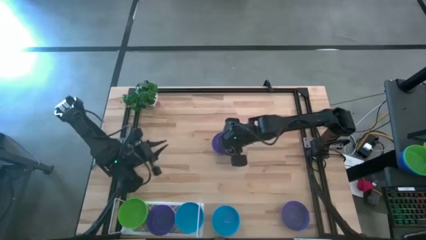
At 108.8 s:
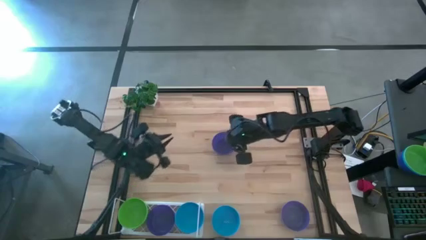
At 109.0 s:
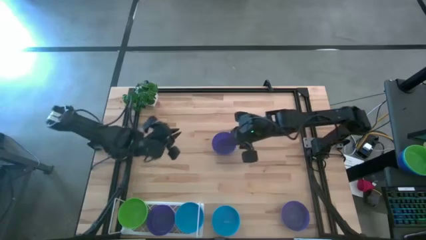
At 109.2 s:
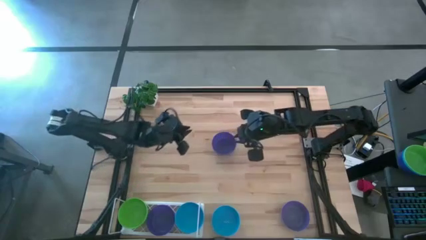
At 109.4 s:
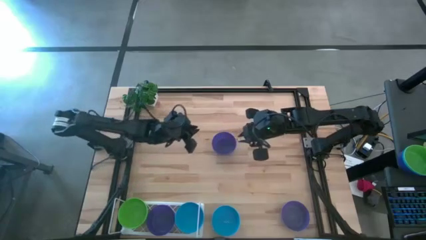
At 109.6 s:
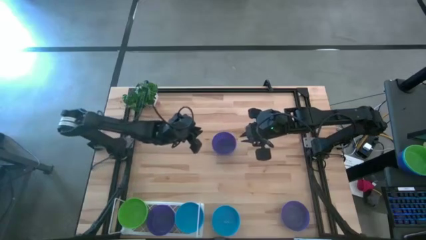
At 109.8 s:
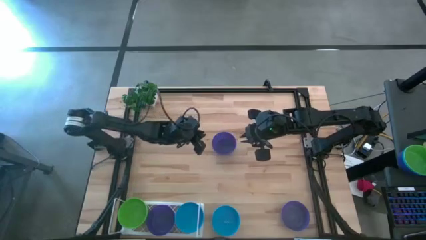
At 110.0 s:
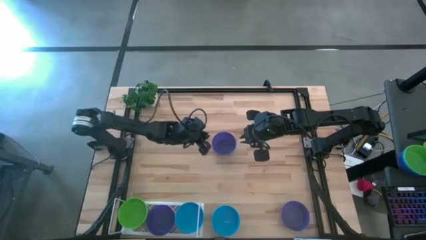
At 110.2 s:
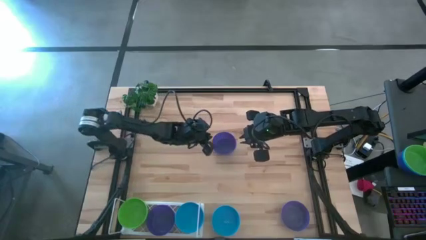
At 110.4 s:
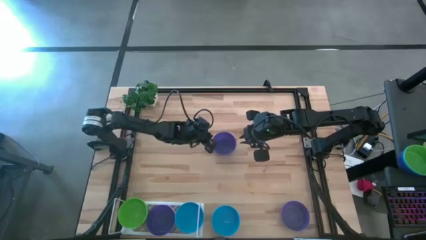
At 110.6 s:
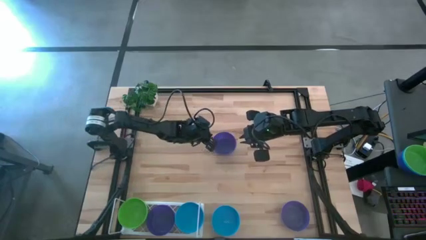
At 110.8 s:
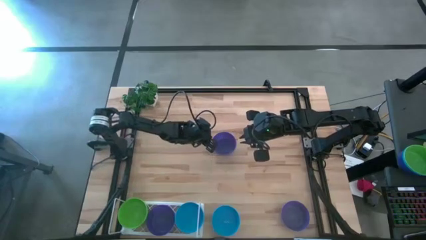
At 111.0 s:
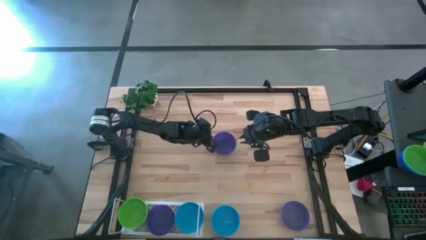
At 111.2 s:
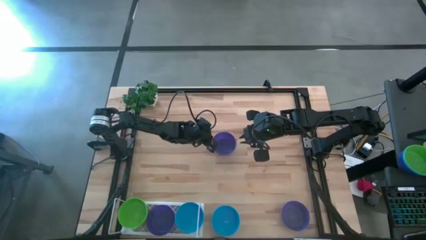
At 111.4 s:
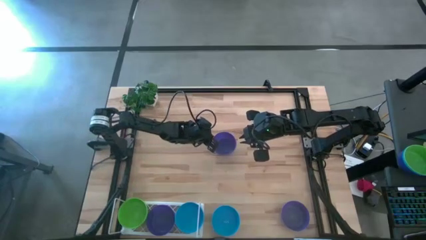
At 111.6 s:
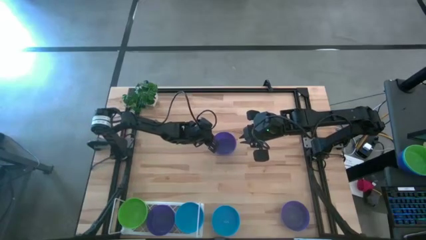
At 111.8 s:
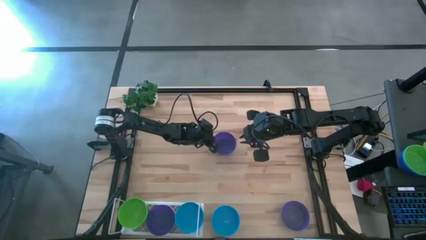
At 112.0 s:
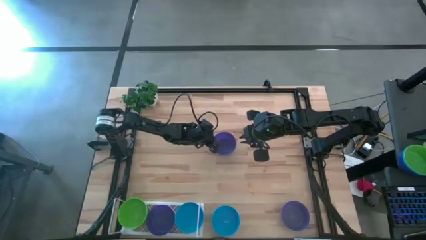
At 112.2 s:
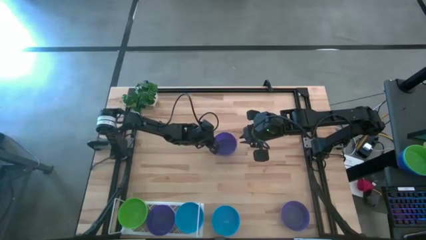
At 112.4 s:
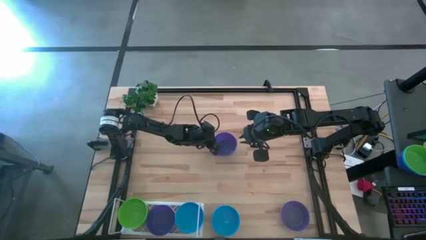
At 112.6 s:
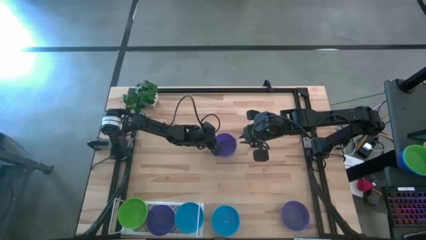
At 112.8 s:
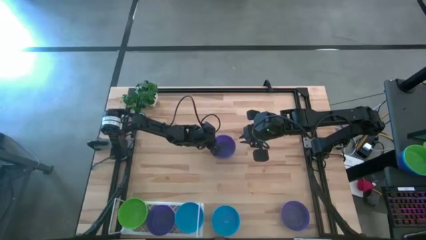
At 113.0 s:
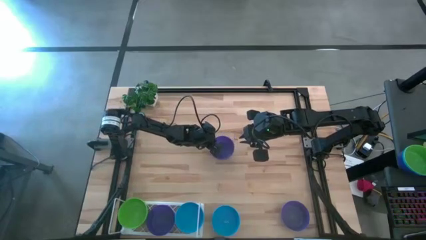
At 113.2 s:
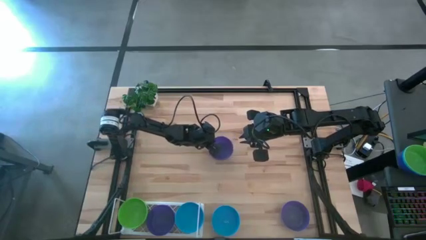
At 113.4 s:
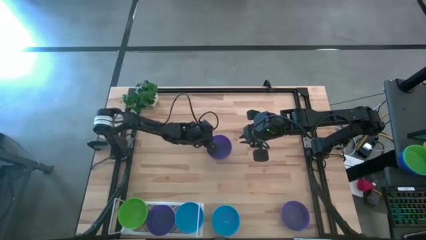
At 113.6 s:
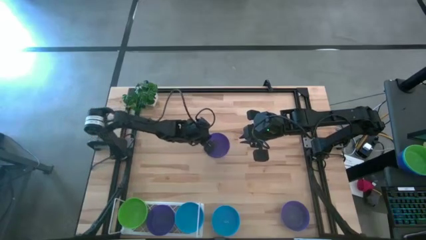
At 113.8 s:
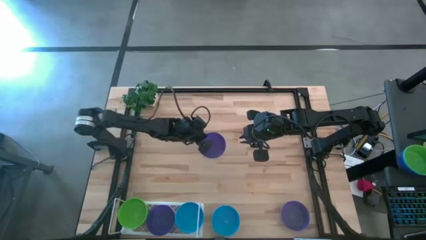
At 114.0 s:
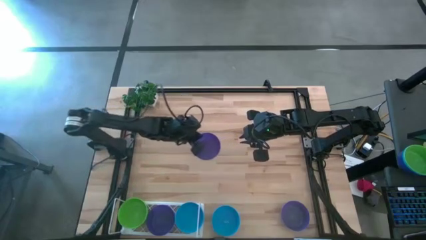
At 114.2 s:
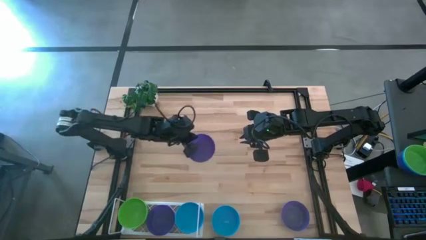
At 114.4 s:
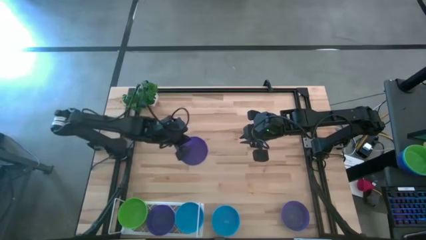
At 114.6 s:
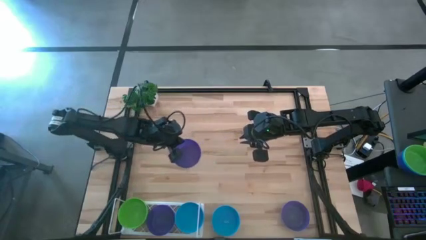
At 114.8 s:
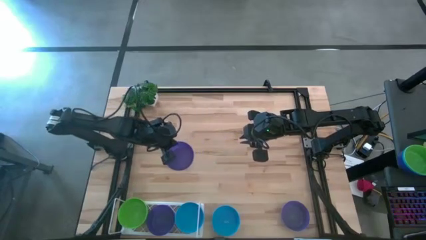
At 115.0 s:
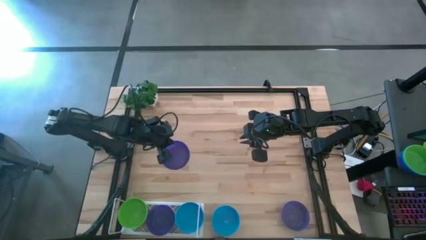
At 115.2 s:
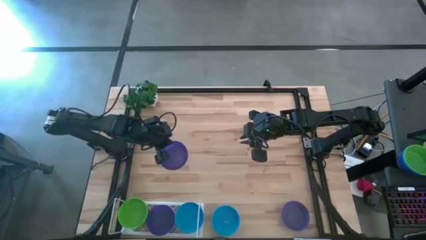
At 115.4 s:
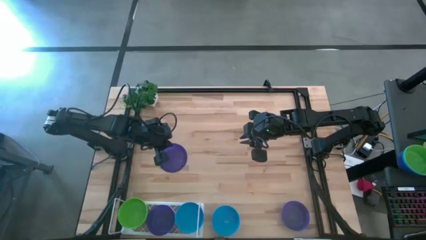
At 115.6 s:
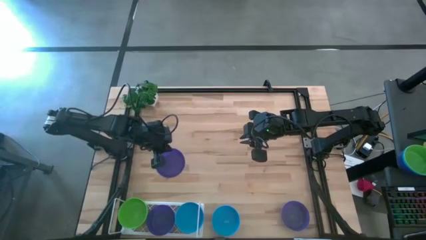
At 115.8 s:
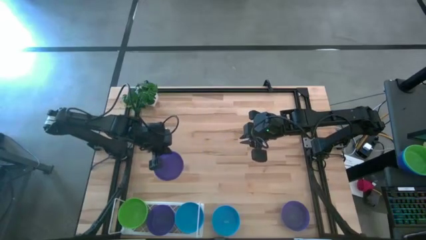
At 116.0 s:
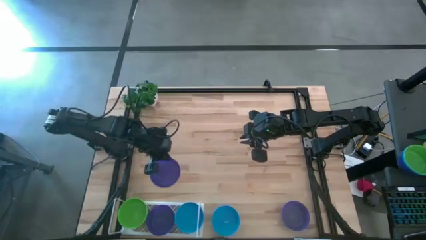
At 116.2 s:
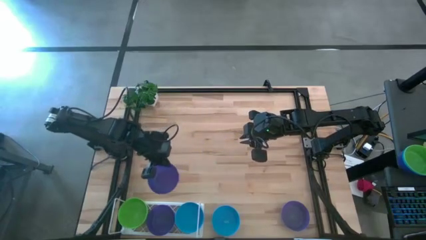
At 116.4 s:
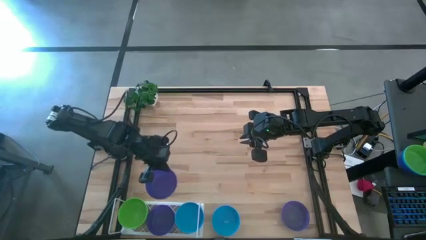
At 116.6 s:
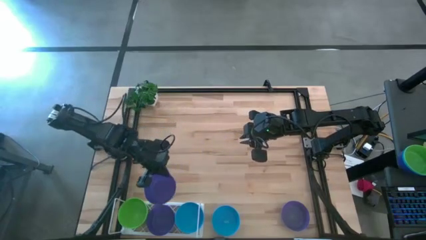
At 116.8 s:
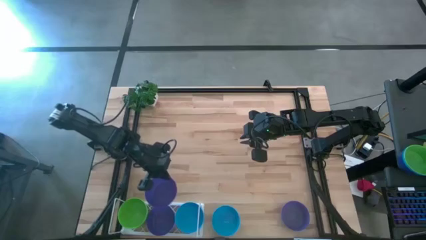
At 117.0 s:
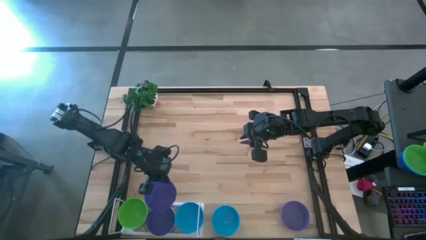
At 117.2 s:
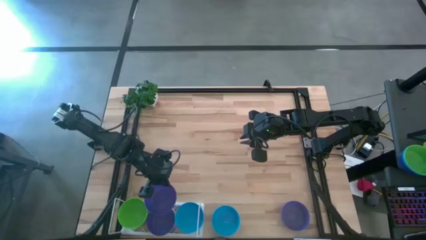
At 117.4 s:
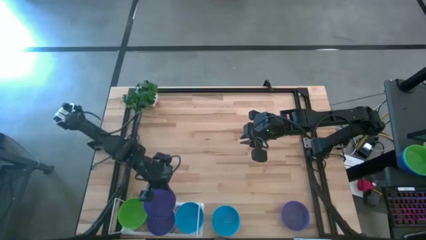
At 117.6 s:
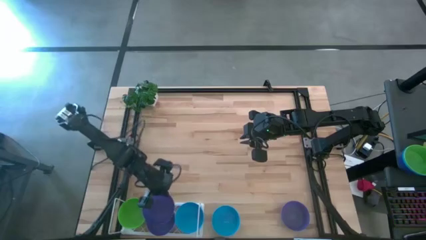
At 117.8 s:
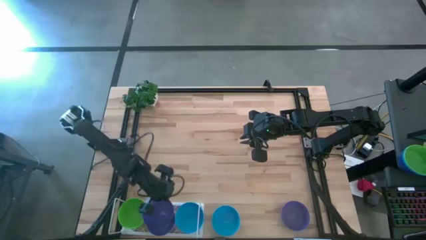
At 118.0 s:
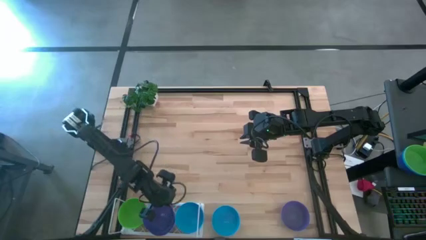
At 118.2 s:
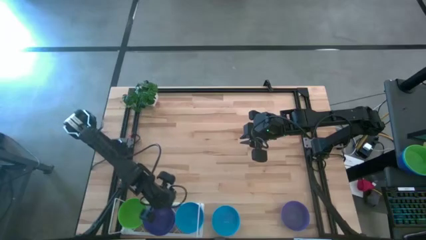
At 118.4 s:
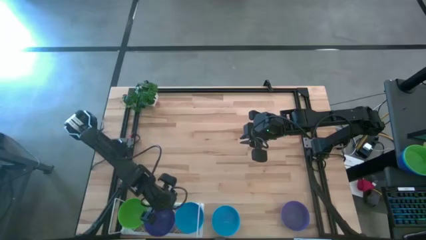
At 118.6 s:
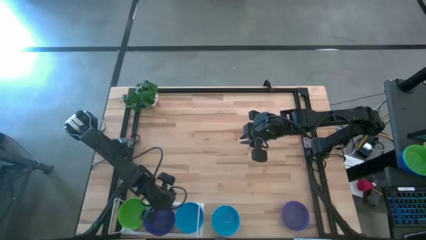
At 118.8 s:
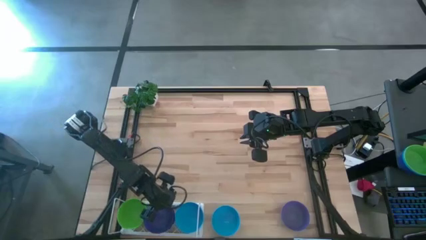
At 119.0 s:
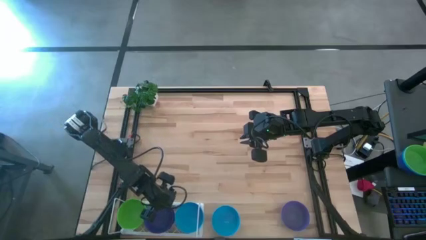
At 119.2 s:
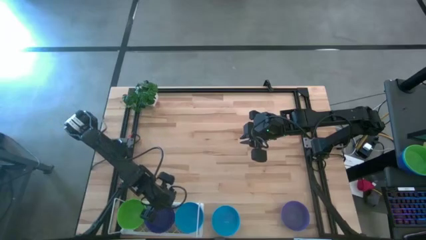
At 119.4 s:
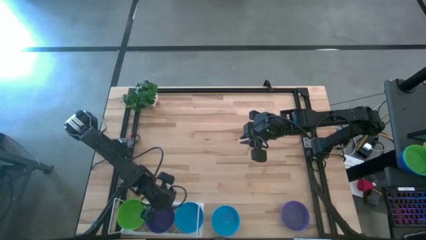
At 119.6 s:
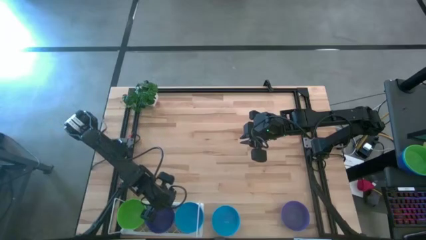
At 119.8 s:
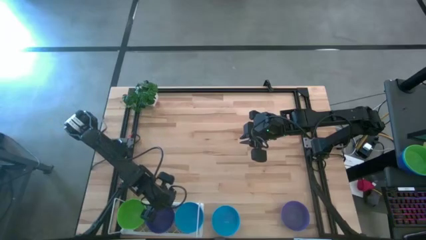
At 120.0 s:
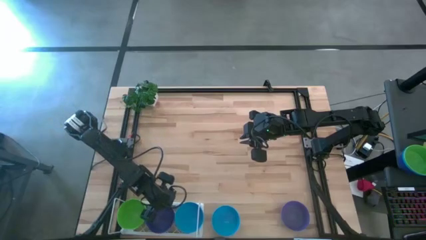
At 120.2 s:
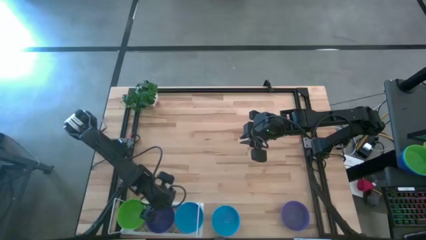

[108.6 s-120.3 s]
Task: Pick & Place Mini bowls
Stack the top purple bowl on the purple bowl on the shelf
